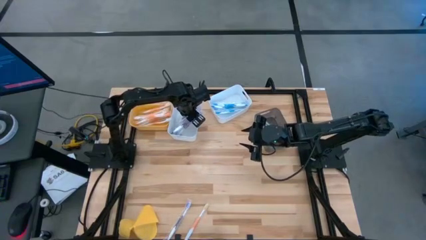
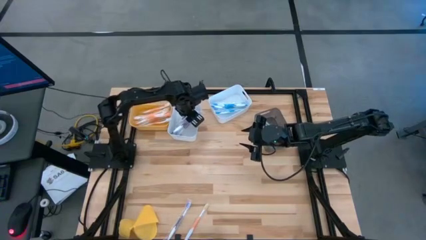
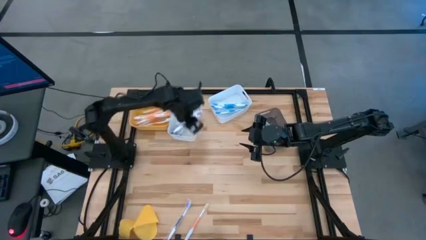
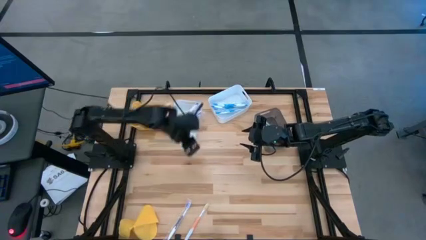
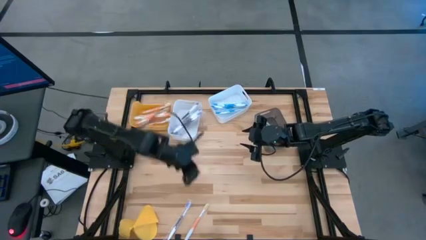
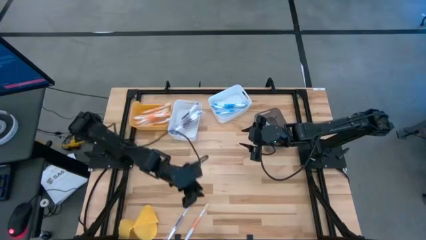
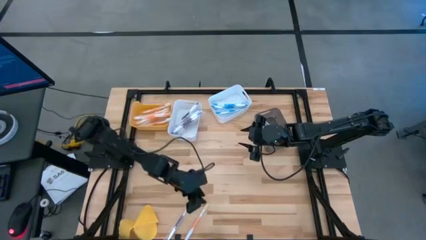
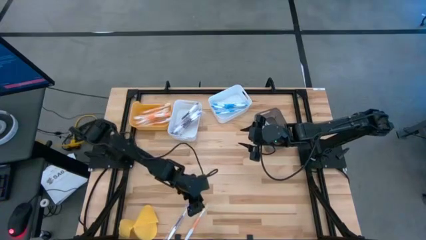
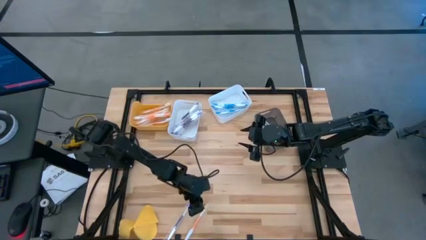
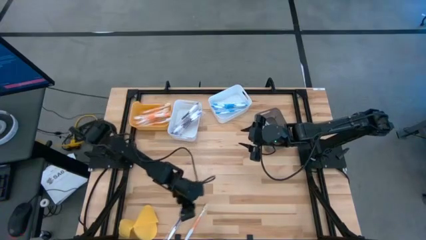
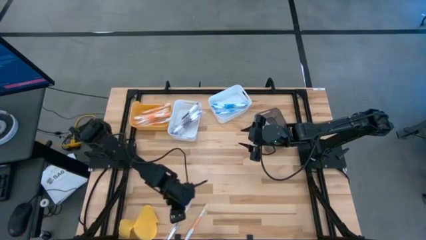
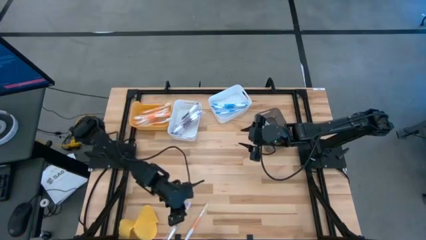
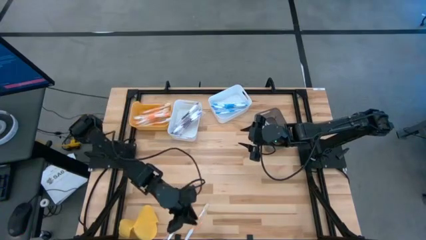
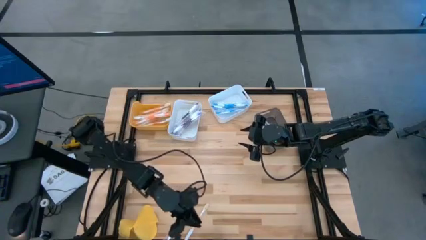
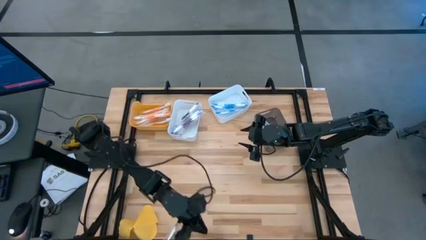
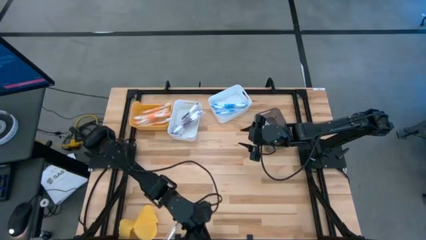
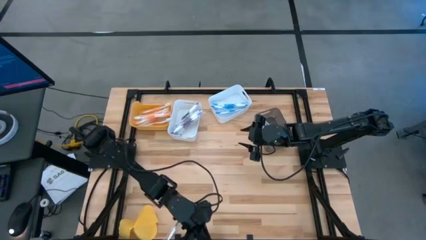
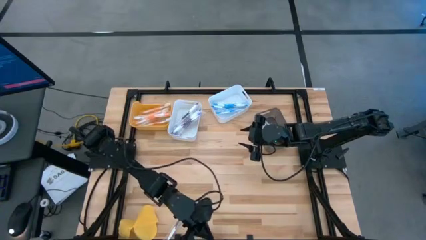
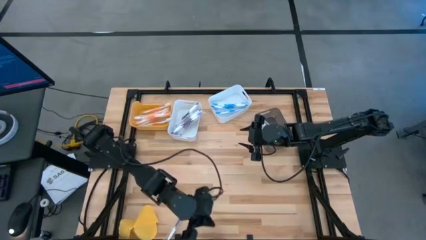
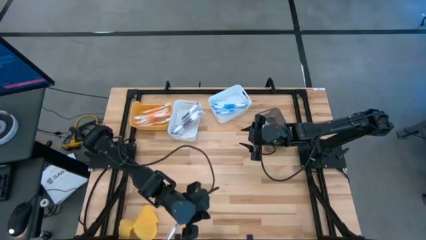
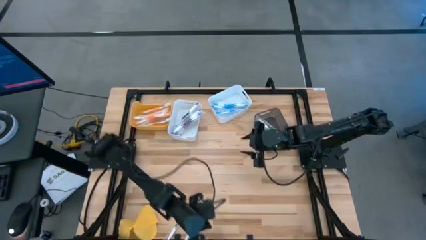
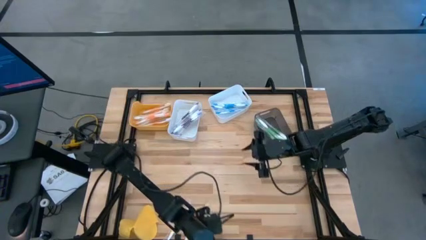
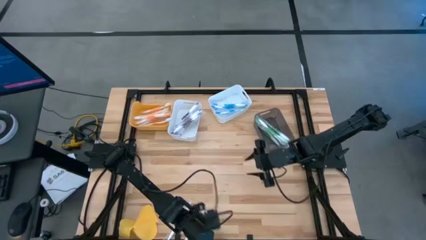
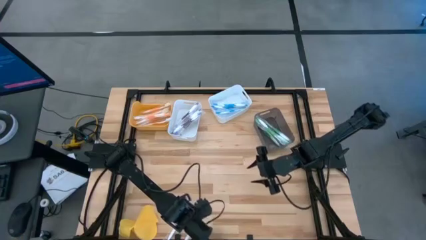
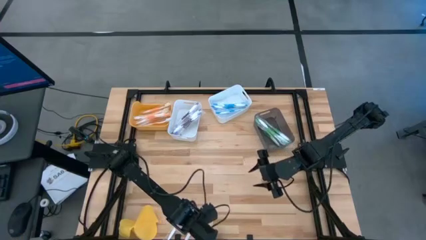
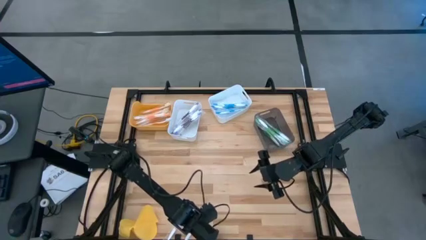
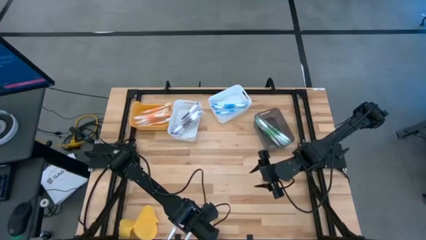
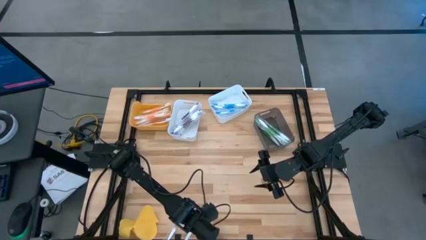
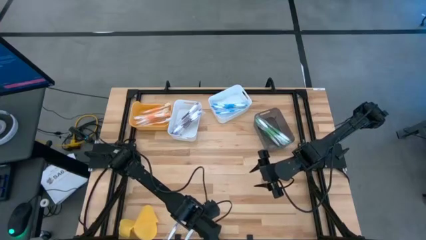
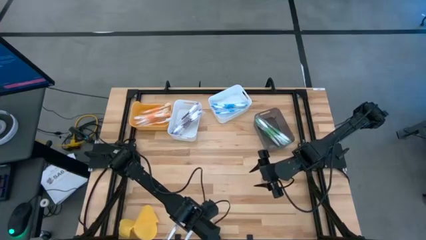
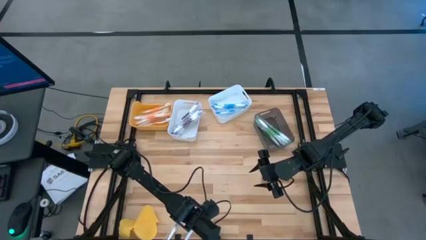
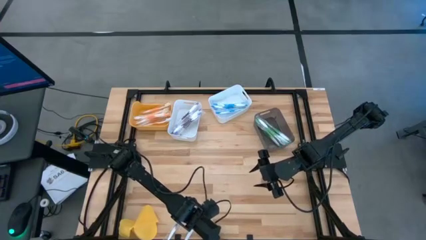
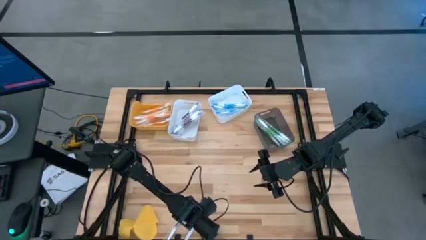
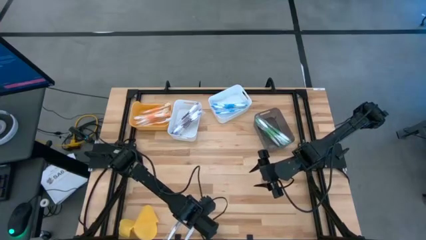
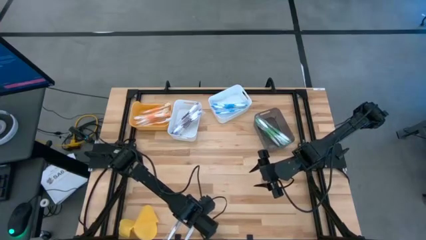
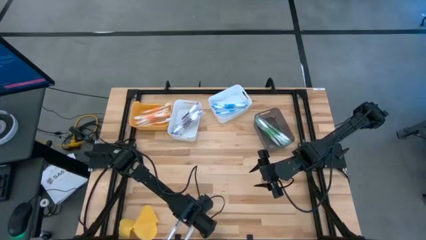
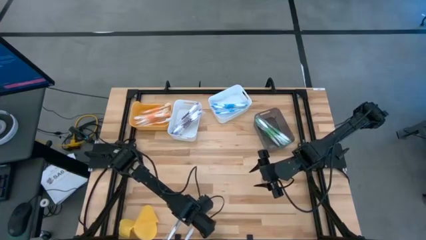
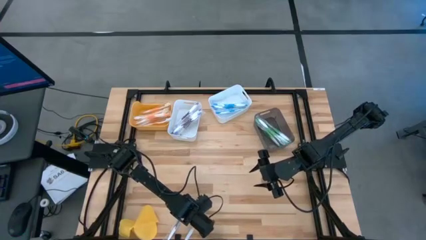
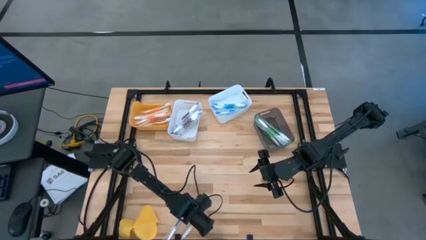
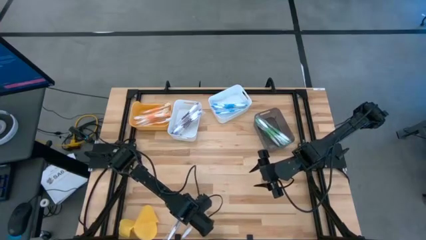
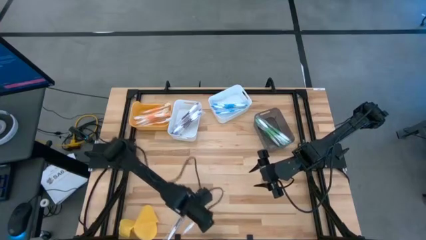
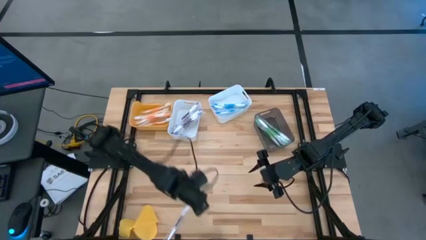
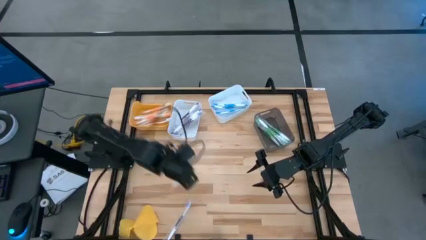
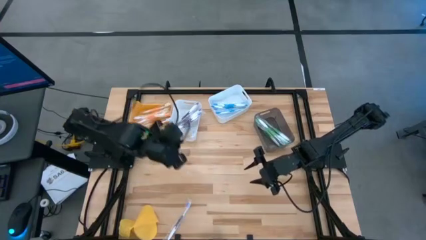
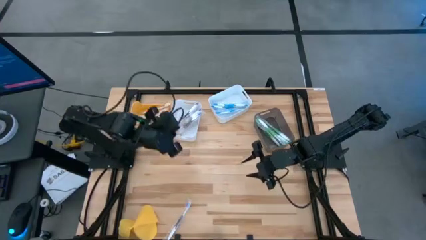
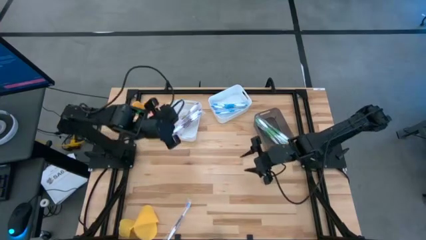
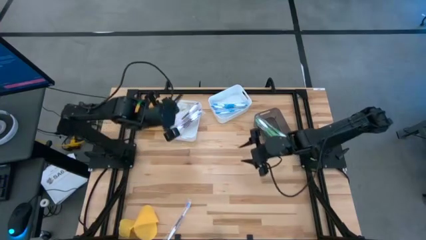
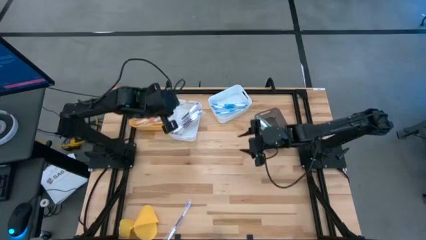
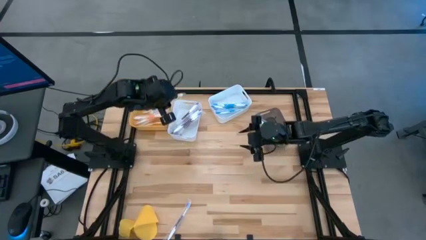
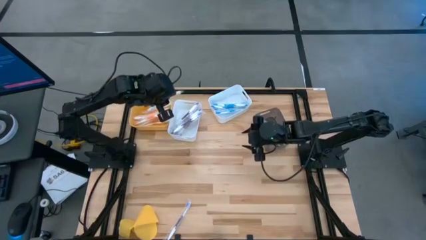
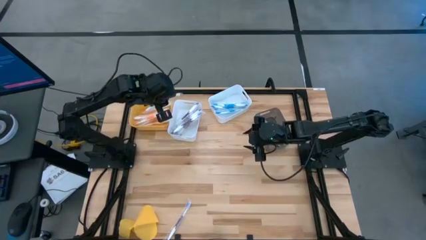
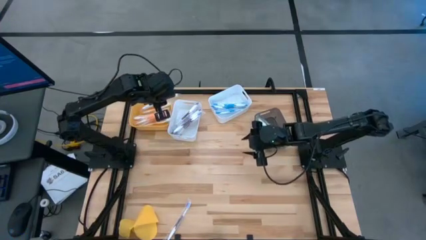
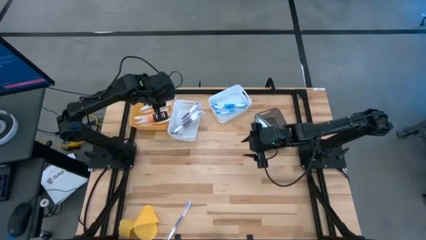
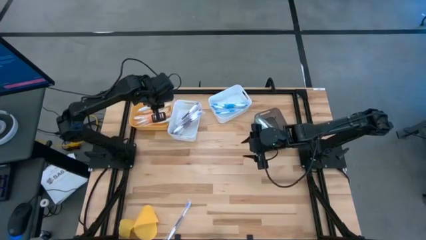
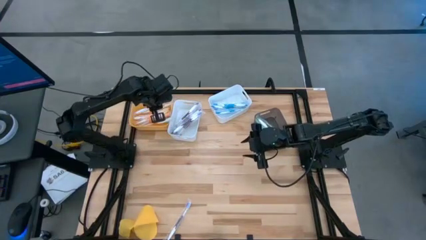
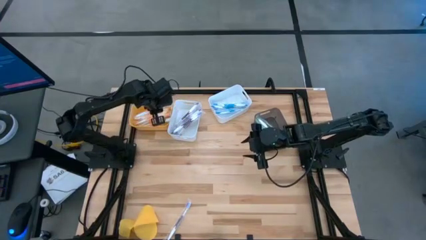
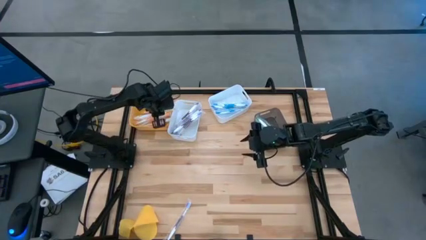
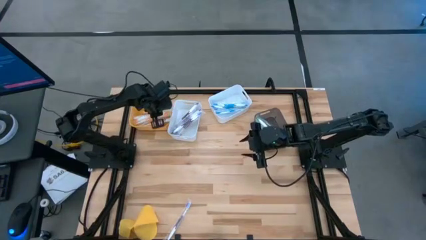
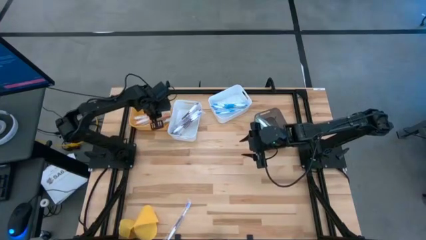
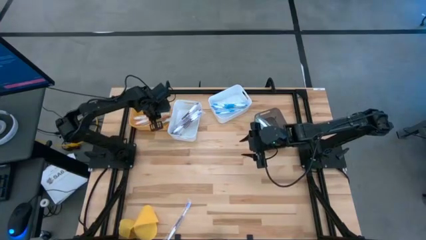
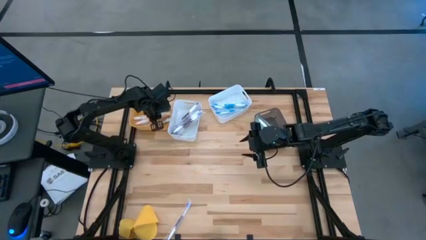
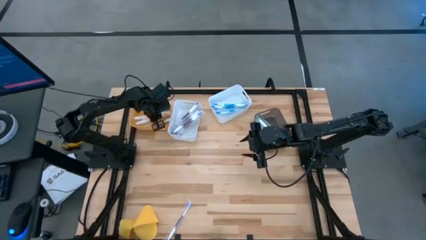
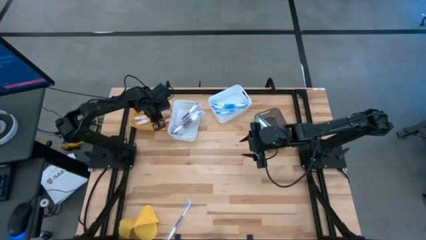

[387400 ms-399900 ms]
Task: Pick & Place Toothbrushes
Put the orange toothbrush into the yellow bin
